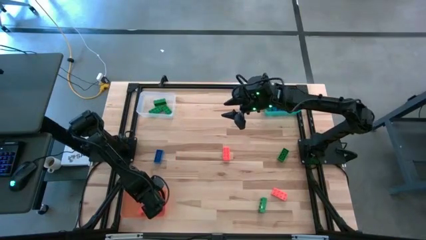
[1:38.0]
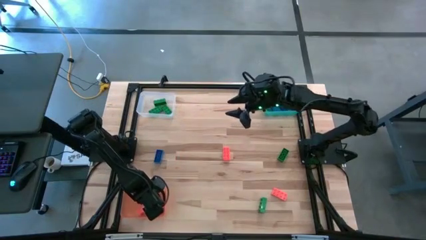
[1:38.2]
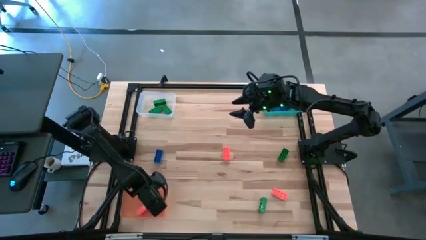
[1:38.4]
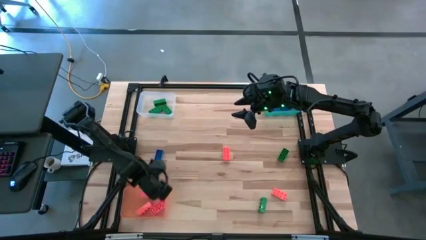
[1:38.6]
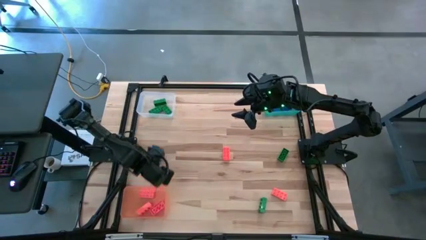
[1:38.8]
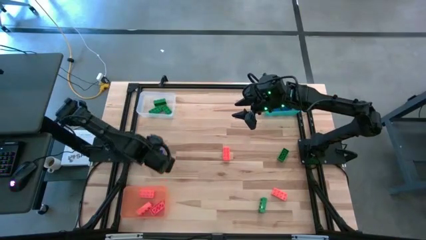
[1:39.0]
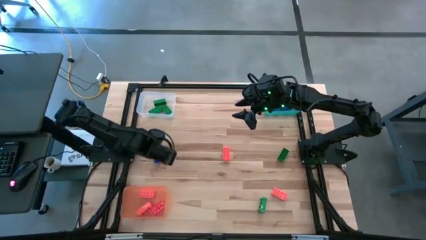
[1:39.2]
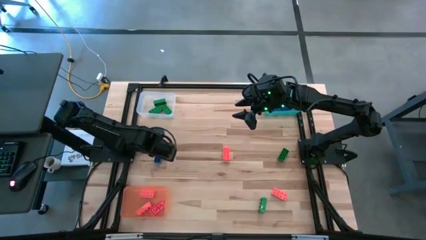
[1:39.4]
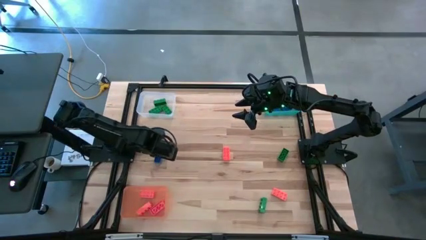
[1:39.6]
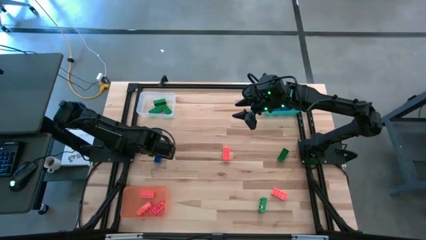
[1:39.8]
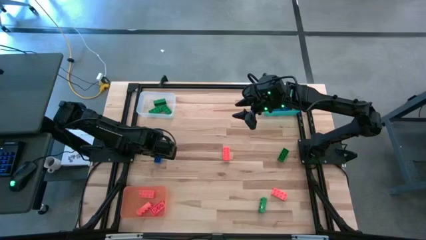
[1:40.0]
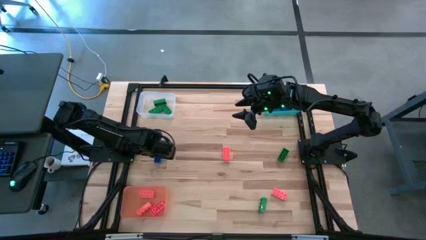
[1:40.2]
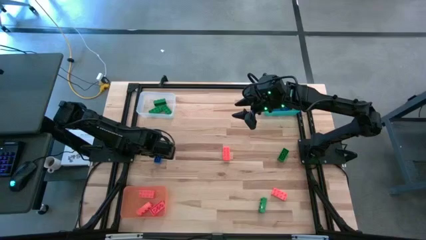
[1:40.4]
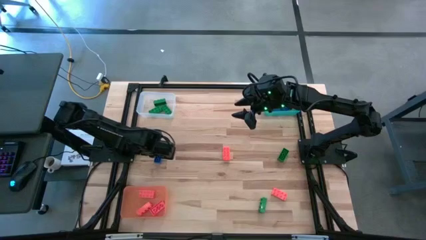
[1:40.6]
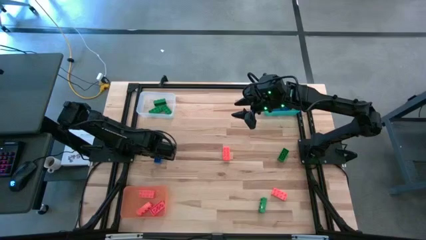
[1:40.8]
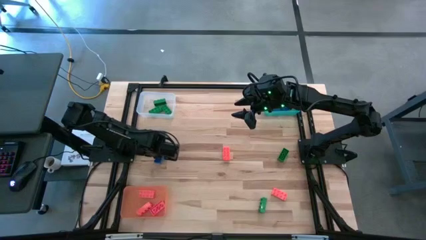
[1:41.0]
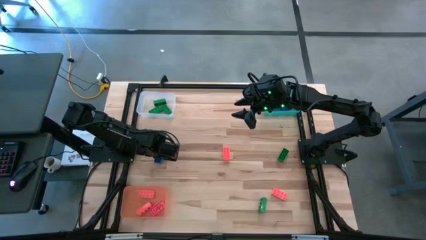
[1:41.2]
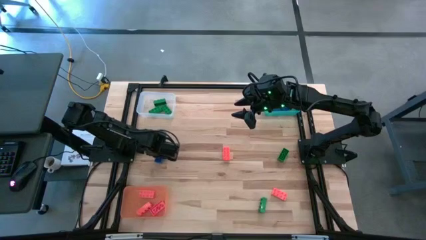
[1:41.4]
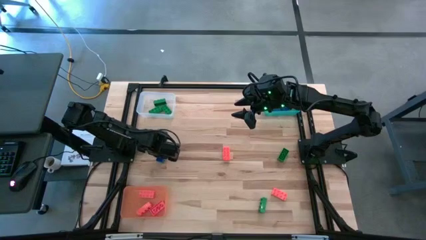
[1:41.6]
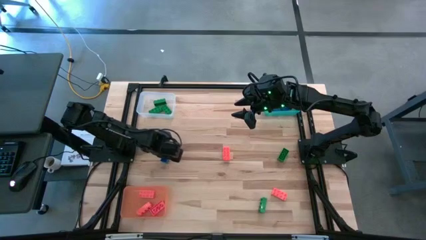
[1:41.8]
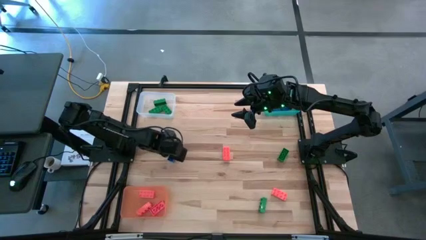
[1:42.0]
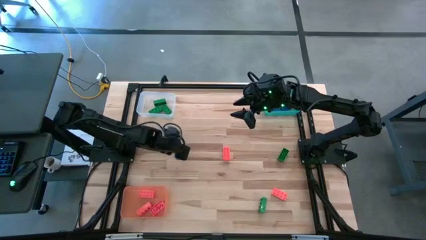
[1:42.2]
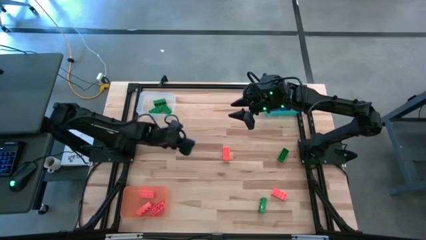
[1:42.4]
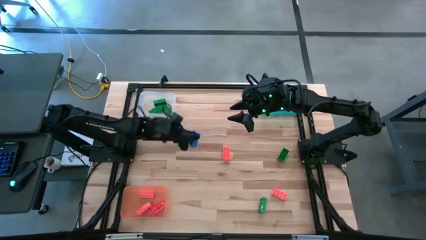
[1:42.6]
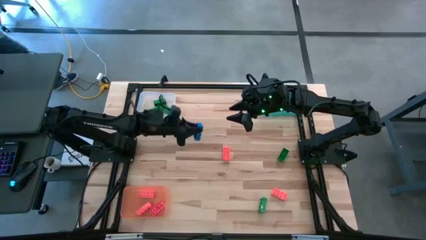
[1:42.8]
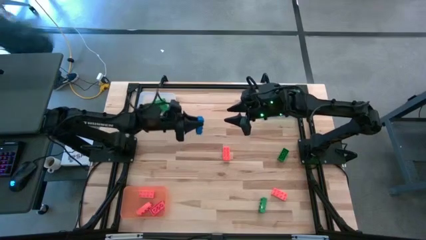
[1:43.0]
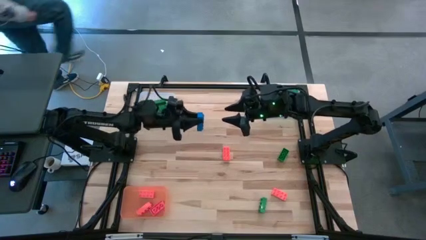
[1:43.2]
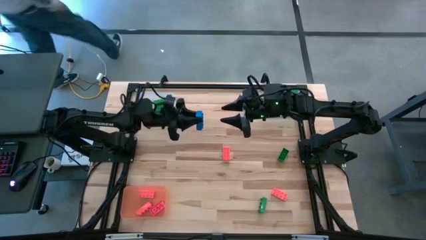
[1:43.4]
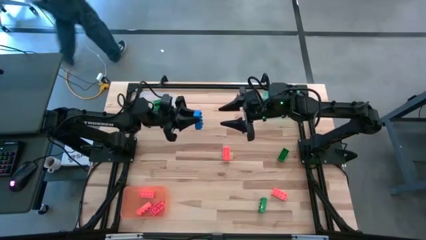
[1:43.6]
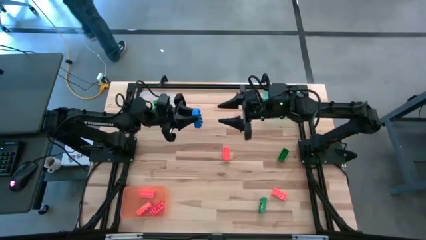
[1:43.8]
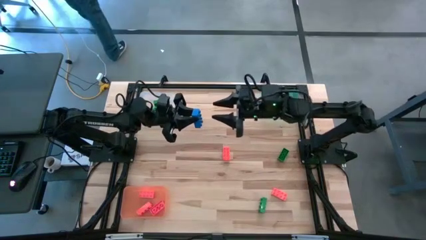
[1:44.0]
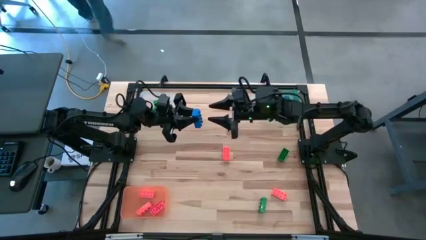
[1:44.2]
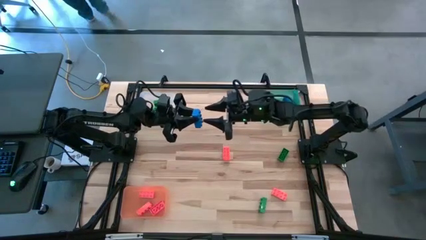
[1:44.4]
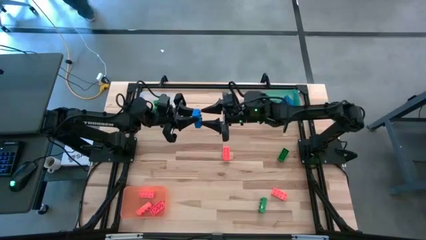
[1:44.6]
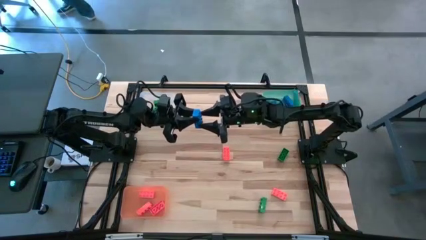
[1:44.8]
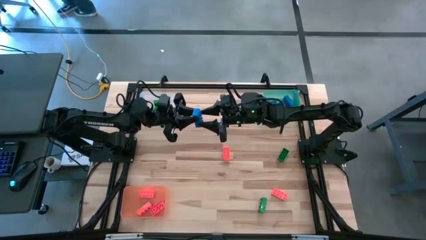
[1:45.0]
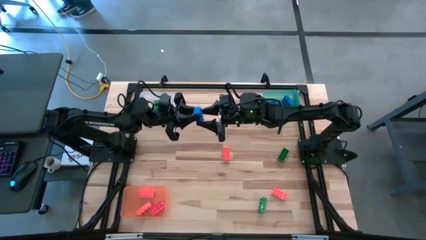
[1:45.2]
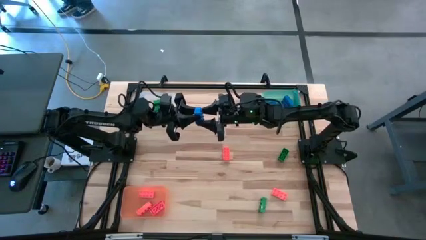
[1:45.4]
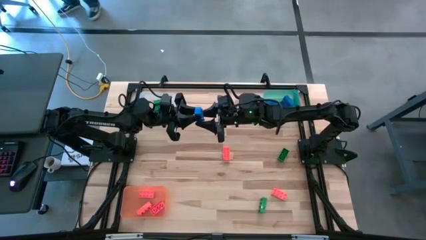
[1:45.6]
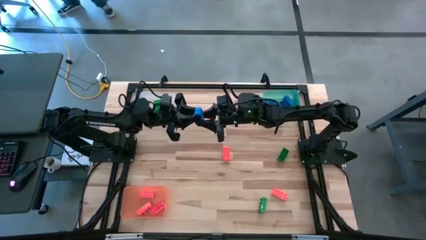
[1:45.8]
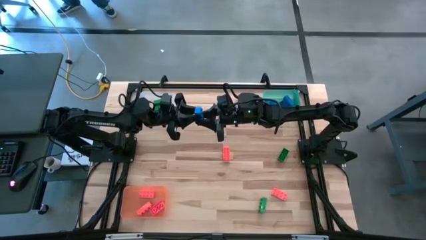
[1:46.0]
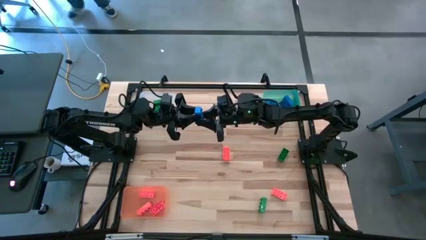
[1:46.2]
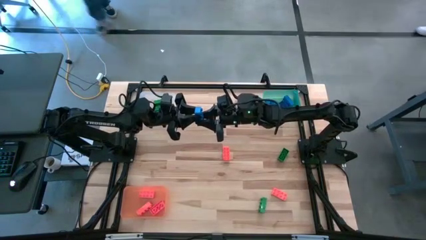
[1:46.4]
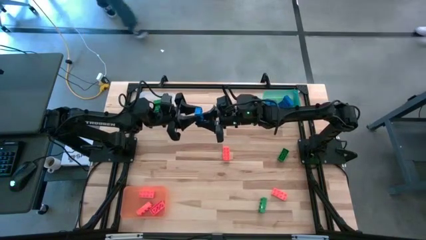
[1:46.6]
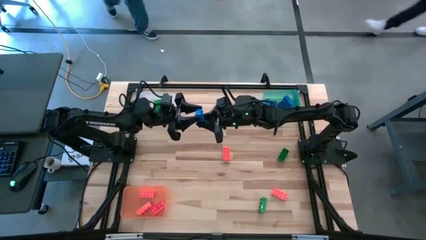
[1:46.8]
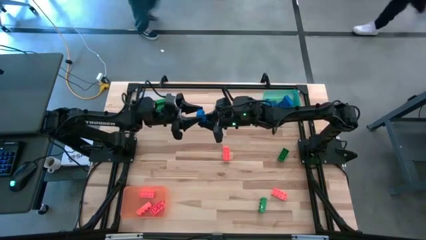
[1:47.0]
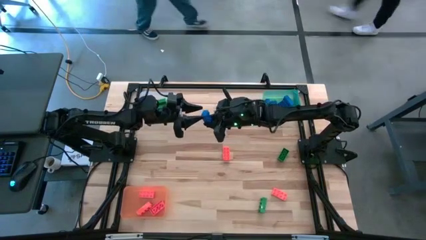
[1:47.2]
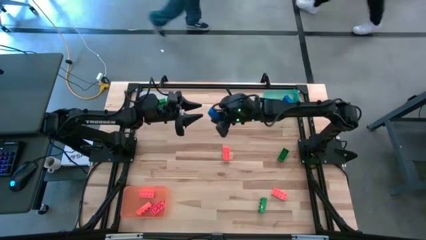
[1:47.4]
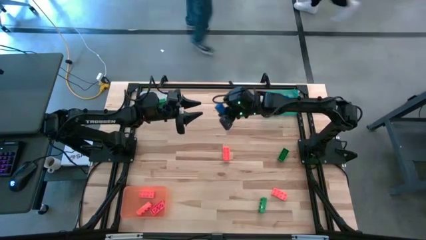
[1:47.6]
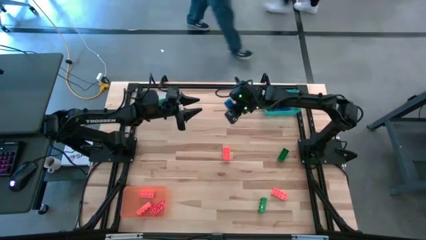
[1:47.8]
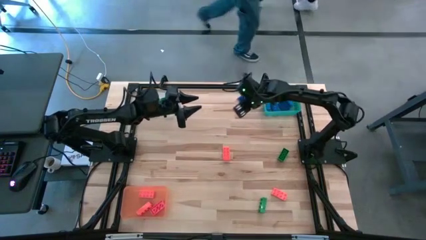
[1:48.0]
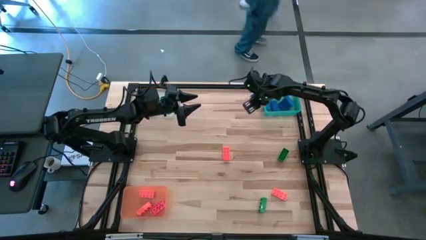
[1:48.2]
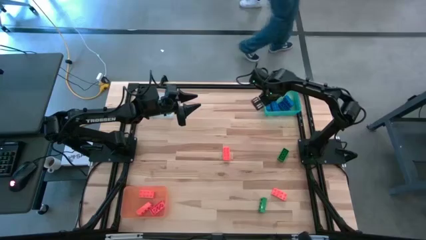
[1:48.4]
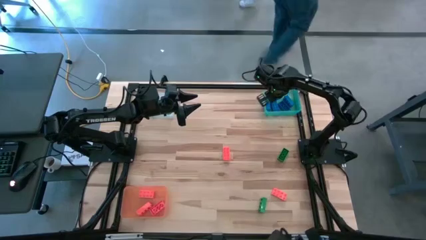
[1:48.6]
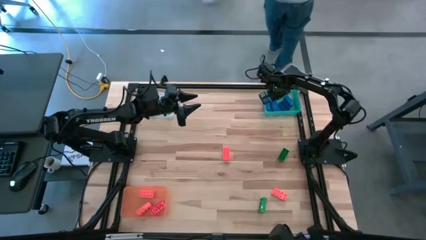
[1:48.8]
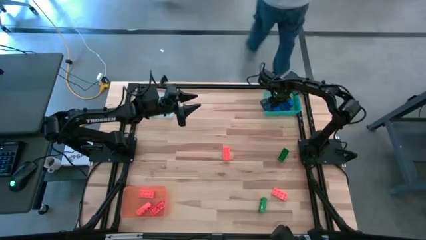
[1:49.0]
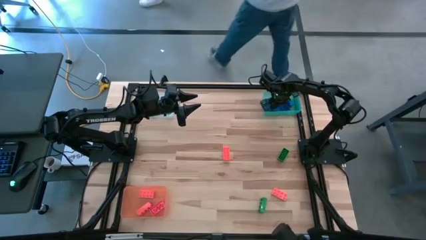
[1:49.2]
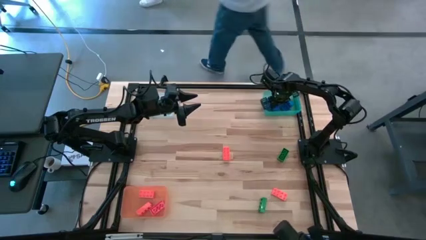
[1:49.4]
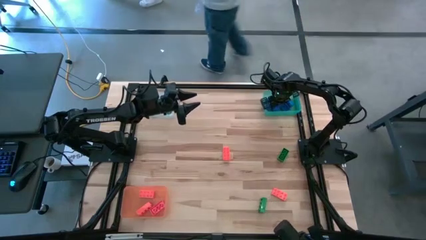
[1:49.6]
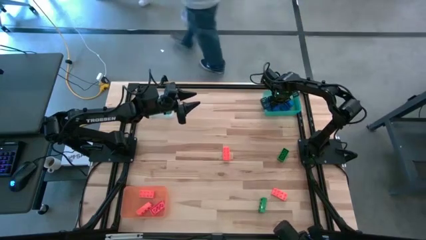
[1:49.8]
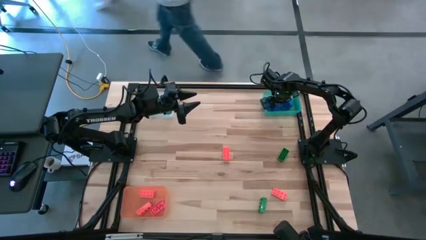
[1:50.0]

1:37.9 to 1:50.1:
Task: Sort & place blocks by color
Put the blue game piece into the blue bin

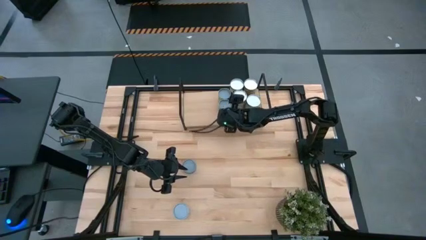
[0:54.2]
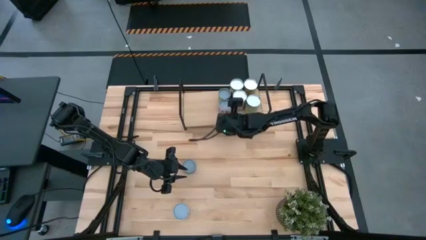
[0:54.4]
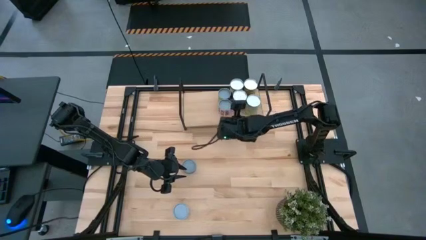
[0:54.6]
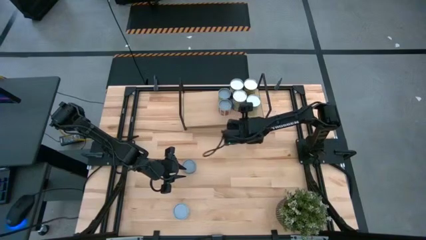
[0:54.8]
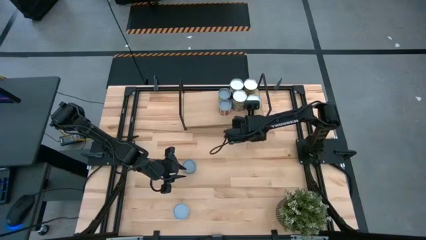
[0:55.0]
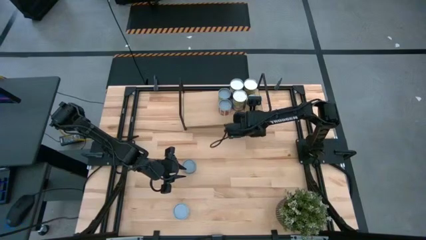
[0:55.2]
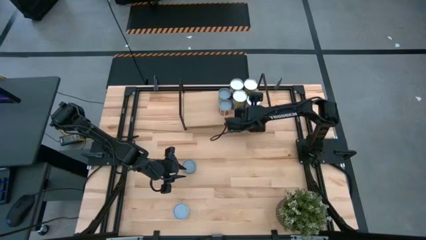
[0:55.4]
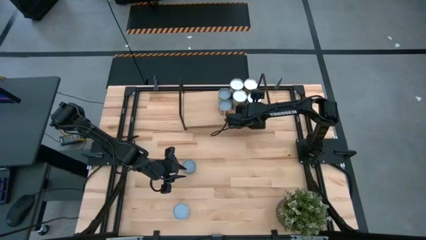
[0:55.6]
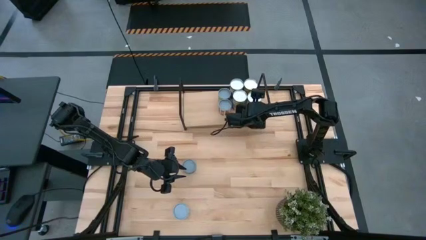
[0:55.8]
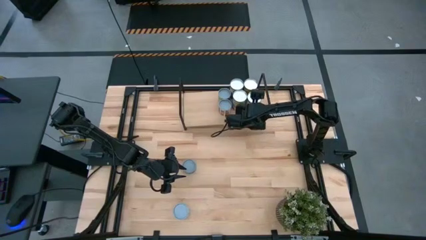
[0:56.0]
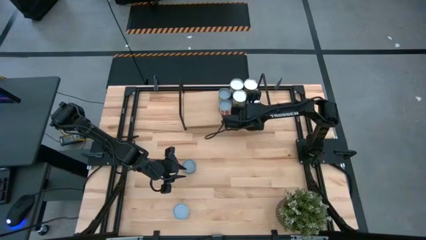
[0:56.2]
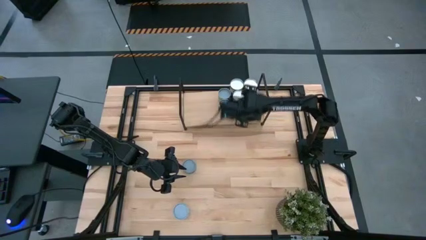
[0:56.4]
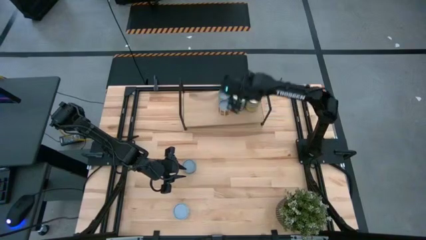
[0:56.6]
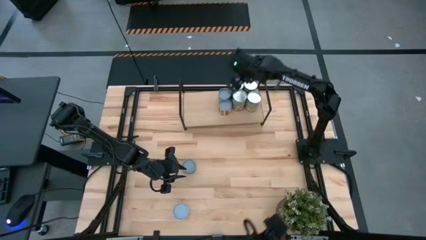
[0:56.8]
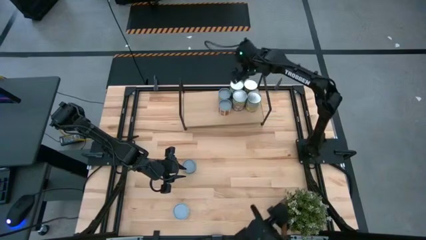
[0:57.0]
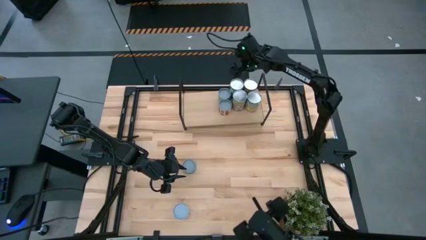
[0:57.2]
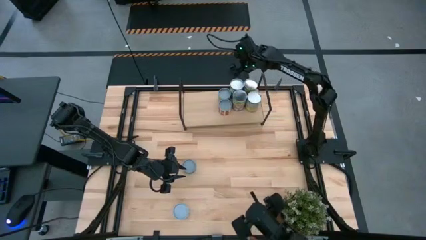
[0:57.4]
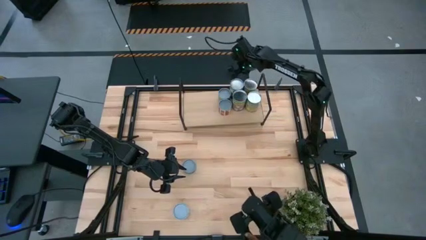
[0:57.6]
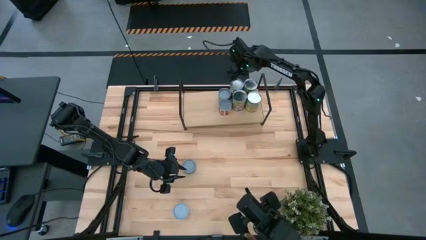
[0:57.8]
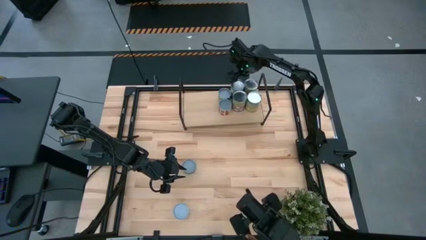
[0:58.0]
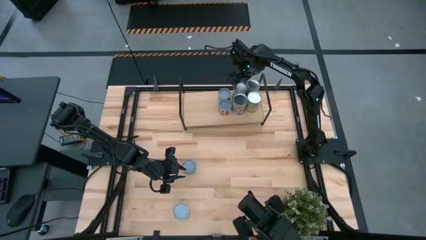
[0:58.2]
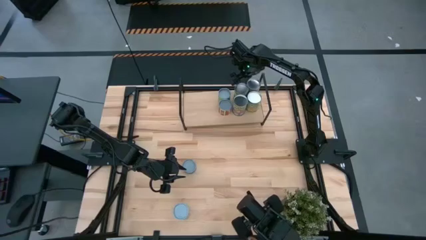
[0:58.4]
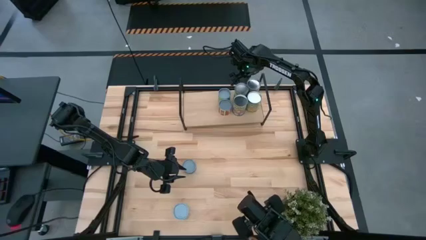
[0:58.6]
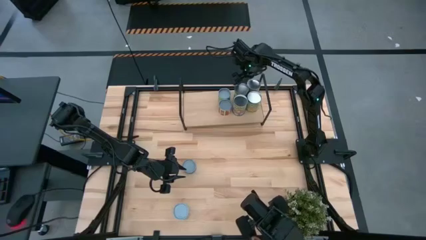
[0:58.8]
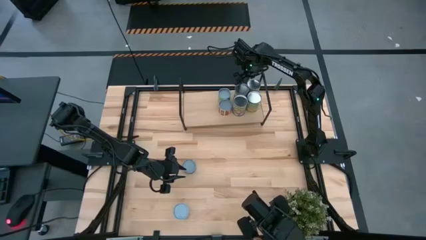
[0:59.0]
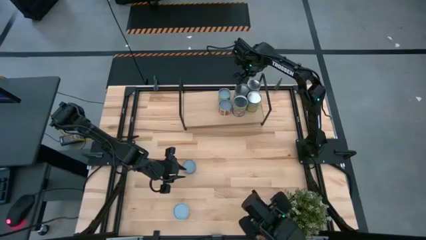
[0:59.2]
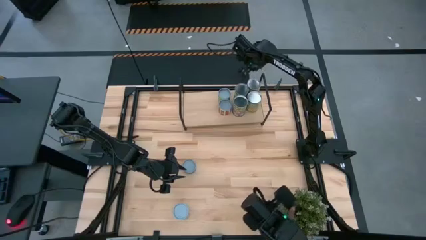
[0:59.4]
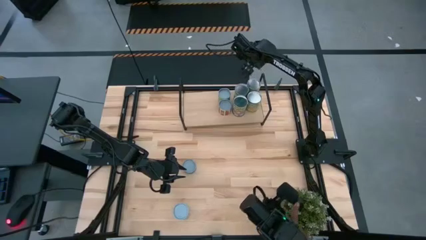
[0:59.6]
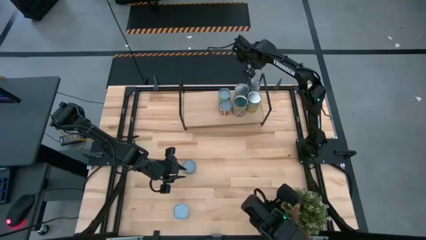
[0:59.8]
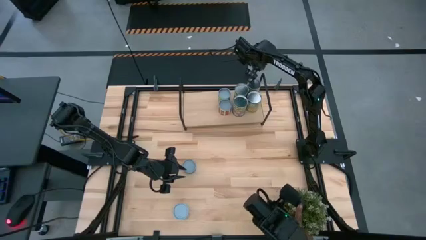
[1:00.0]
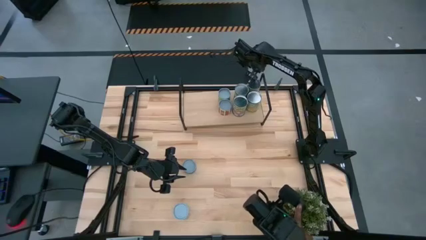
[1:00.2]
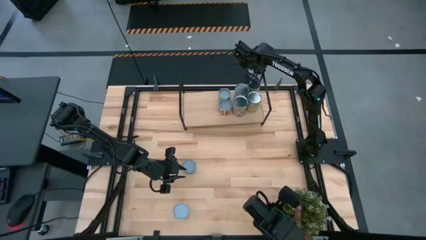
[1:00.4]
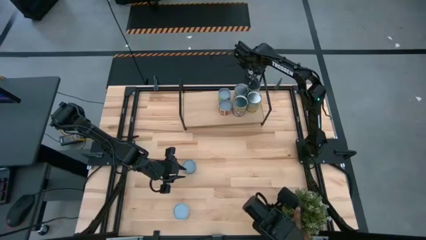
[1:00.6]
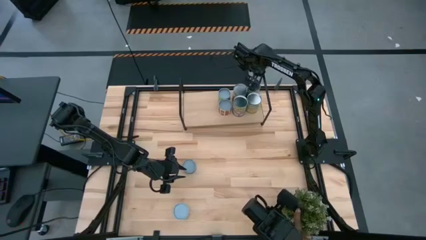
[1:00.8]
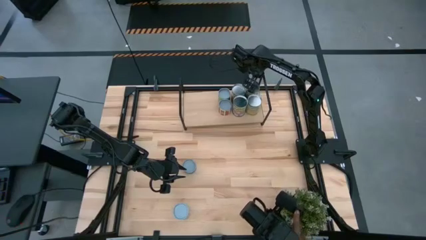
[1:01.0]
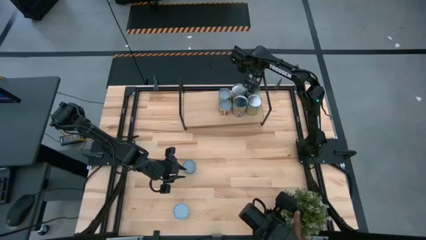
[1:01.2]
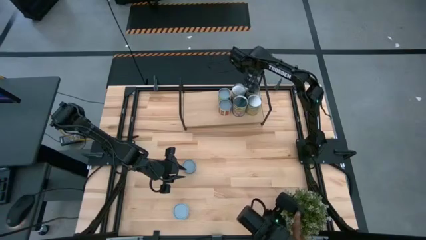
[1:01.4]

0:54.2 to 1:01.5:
Task: Pick and place cans onto a shelf
Adjust the canned goods on the shelf
